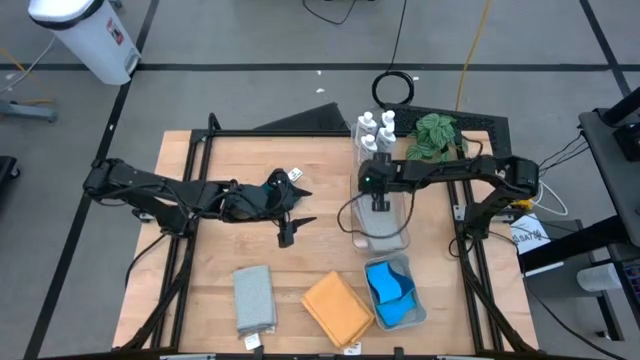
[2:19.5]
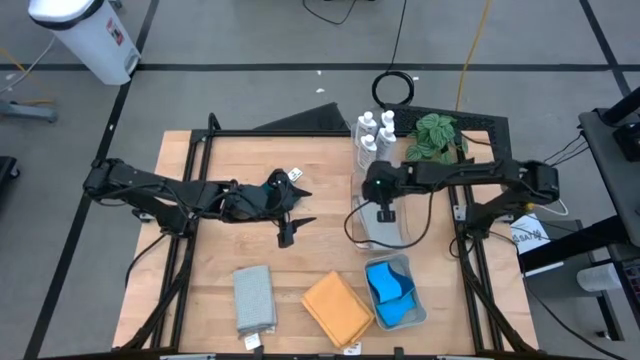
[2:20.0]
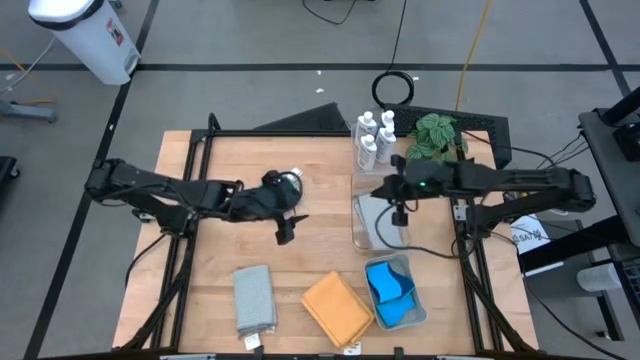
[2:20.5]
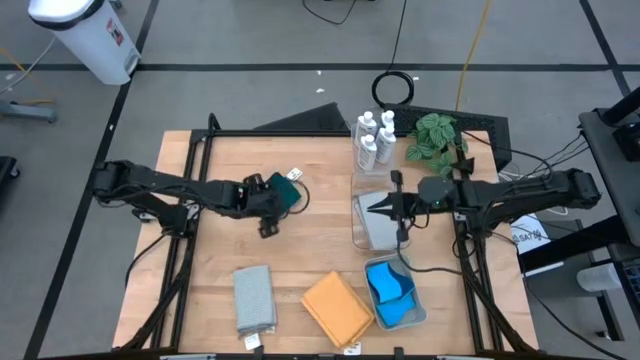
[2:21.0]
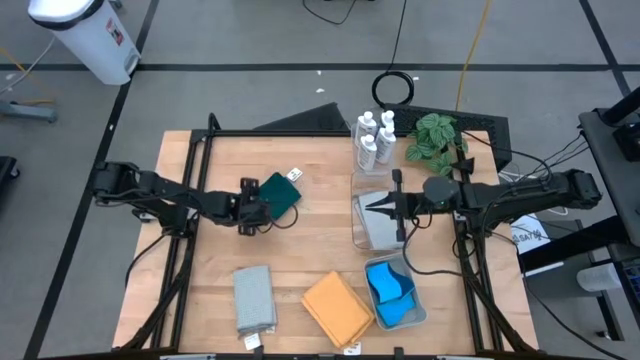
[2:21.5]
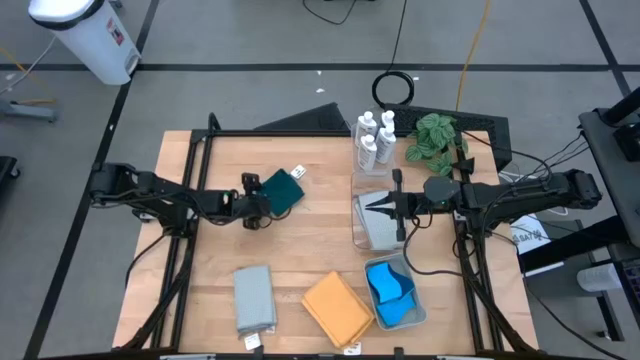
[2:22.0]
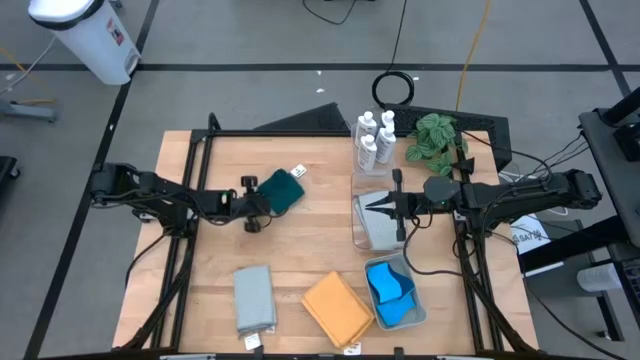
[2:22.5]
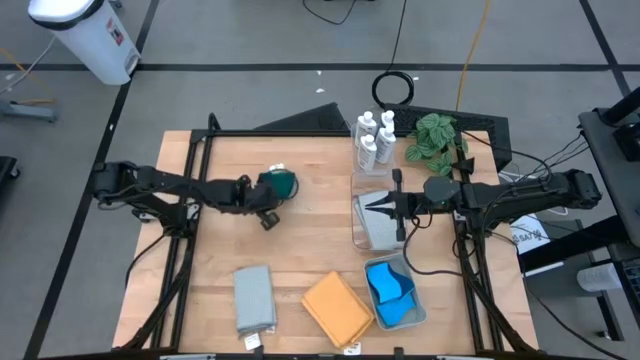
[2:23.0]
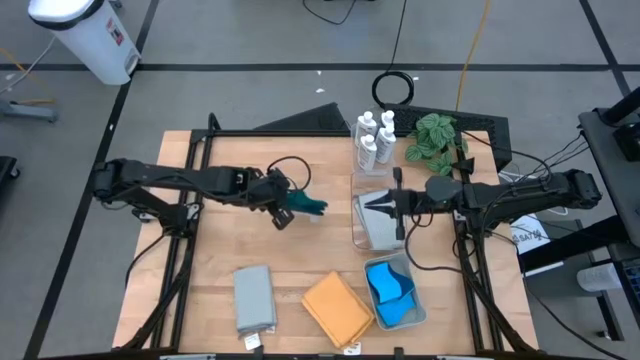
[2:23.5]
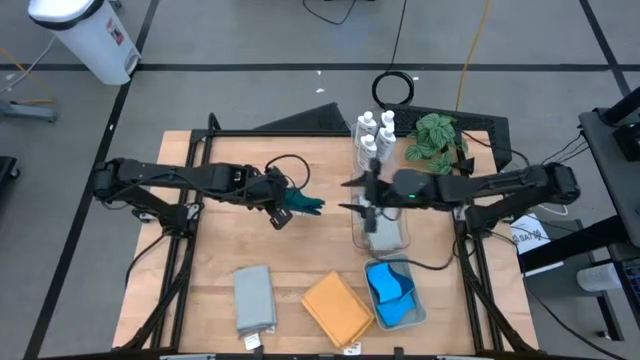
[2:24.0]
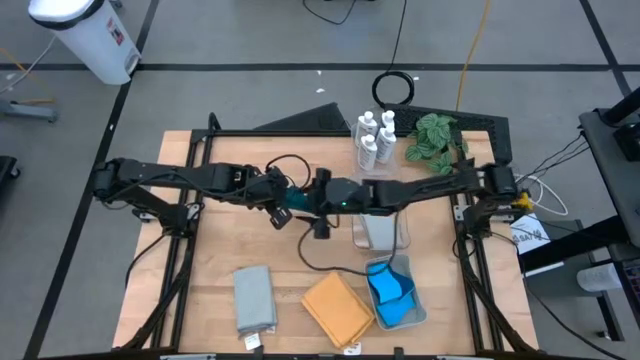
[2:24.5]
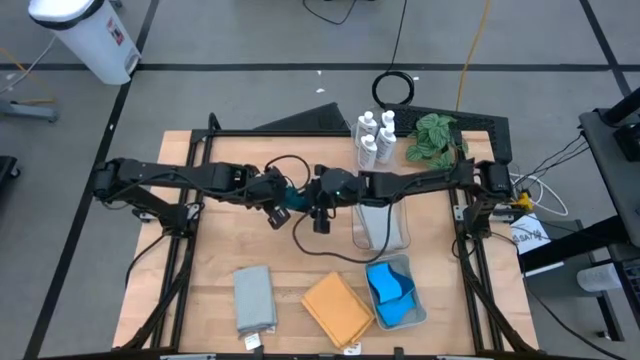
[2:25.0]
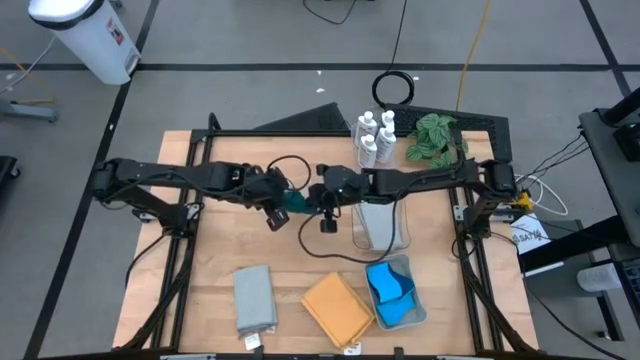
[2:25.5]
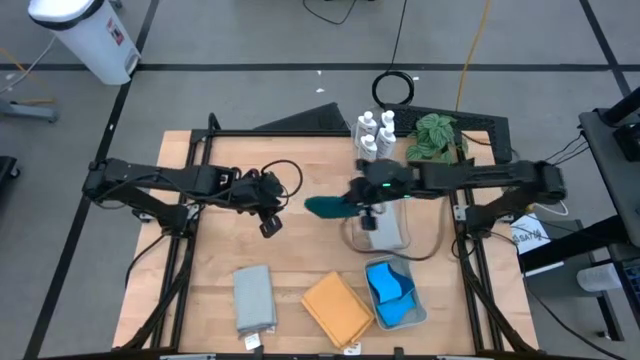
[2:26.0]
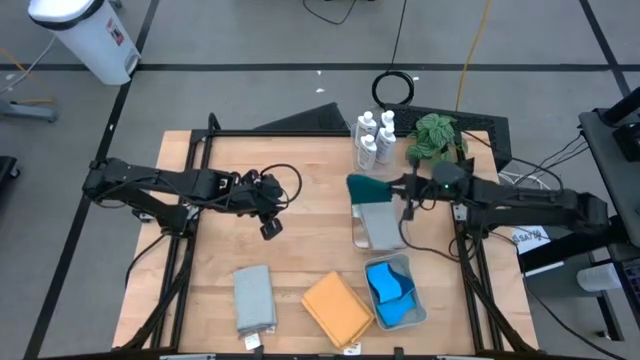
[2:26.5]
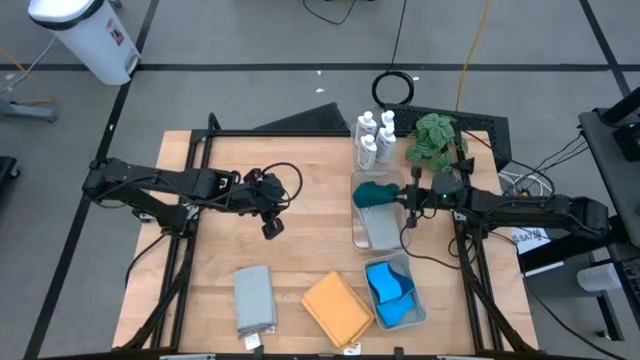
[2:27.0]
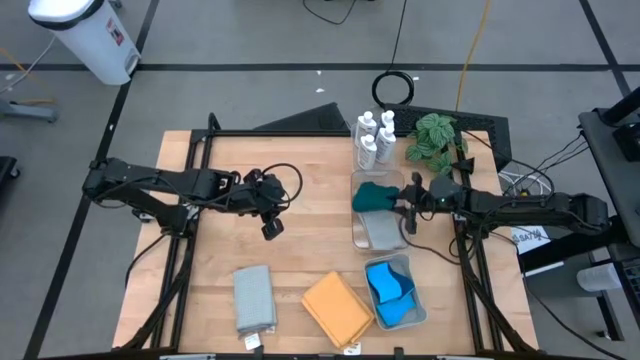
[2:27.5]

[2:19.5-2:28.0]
Task: Pick & Place Kitchen Items
Put the blue towel into the bottom transparent bin

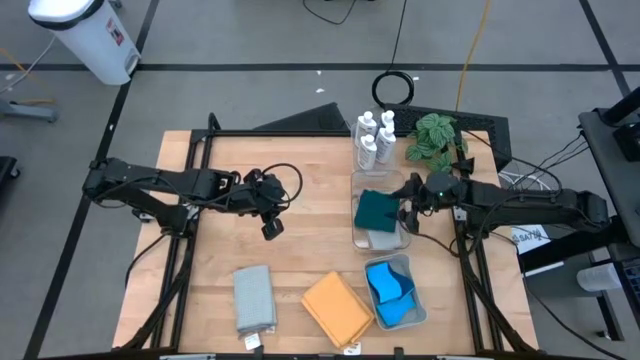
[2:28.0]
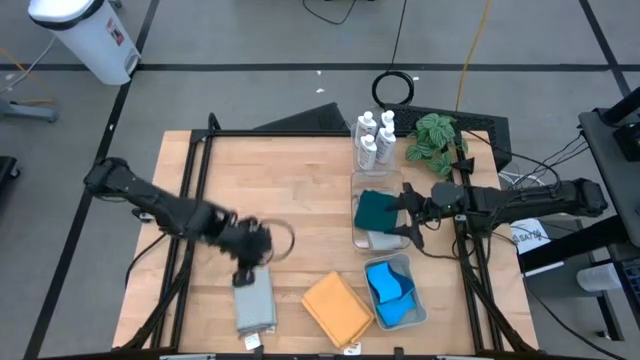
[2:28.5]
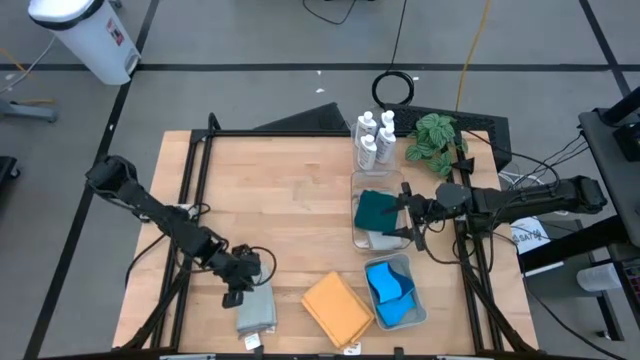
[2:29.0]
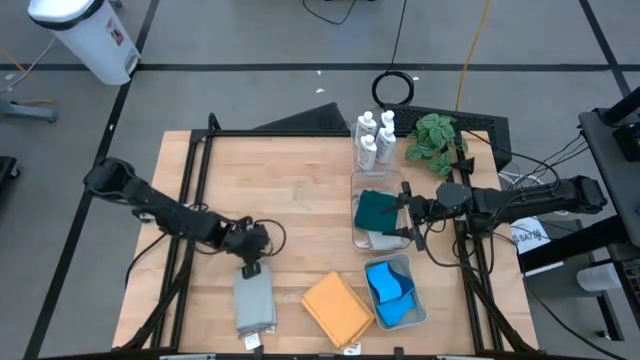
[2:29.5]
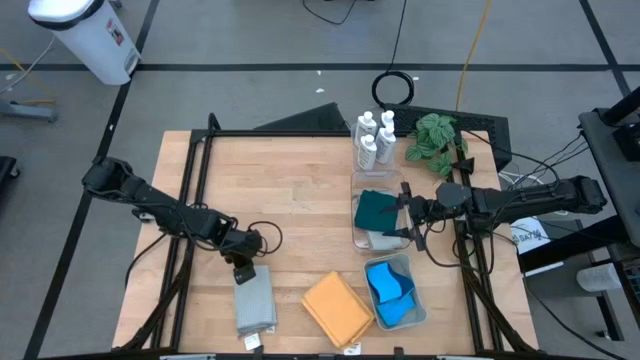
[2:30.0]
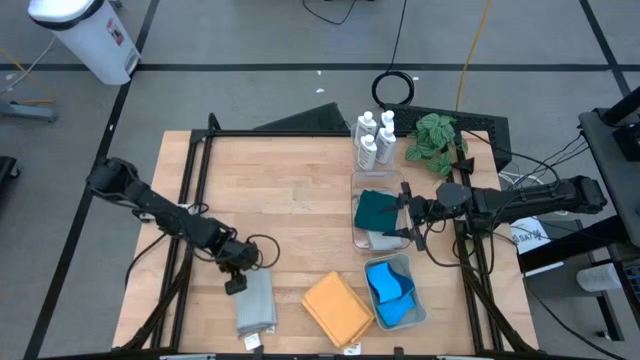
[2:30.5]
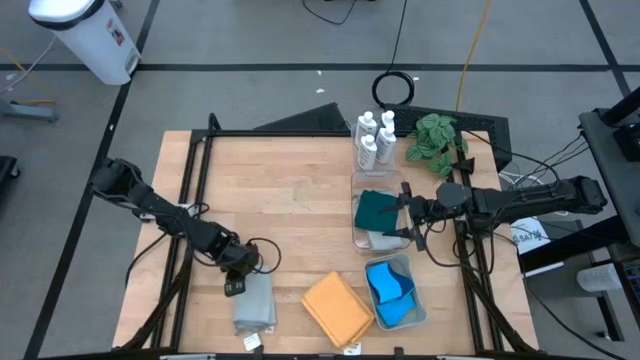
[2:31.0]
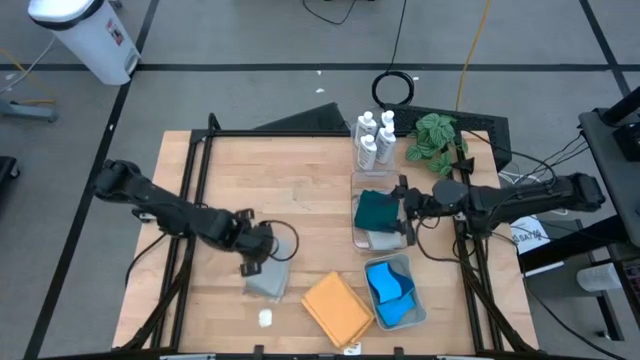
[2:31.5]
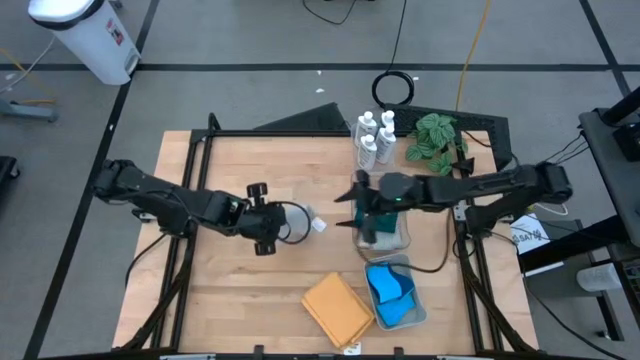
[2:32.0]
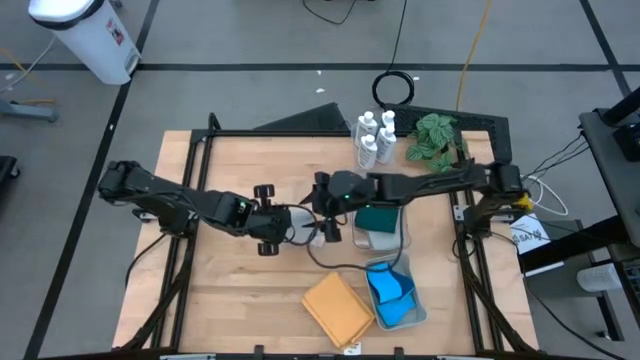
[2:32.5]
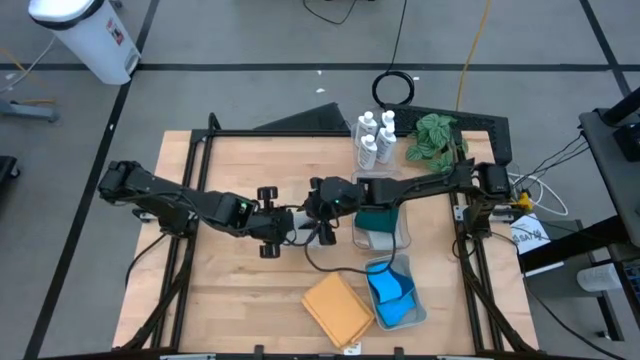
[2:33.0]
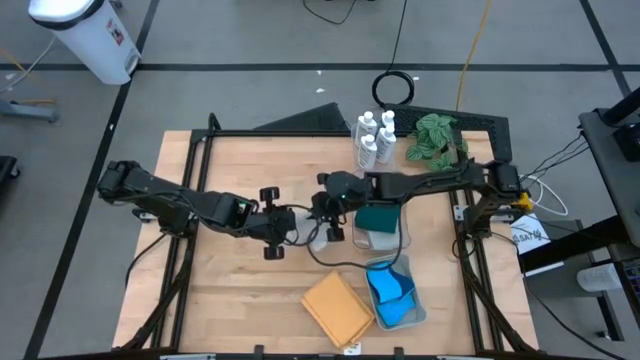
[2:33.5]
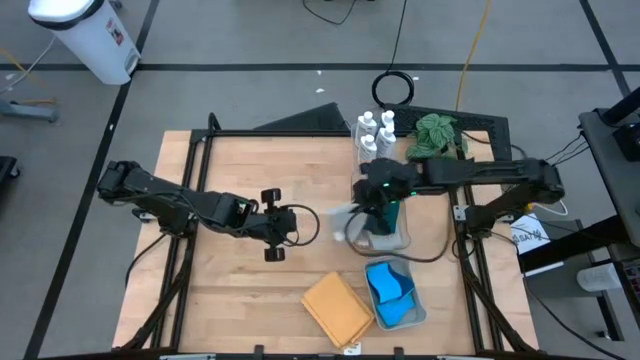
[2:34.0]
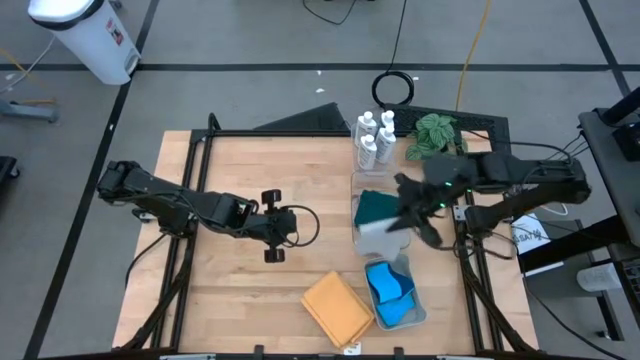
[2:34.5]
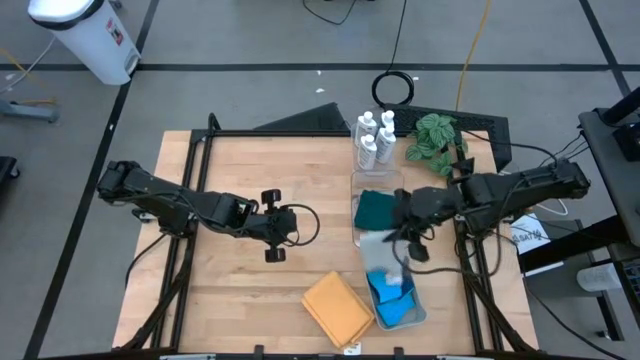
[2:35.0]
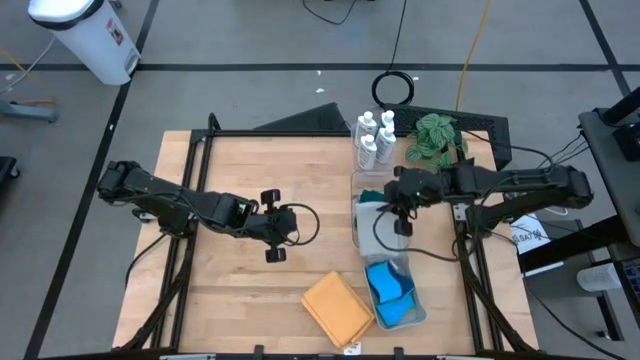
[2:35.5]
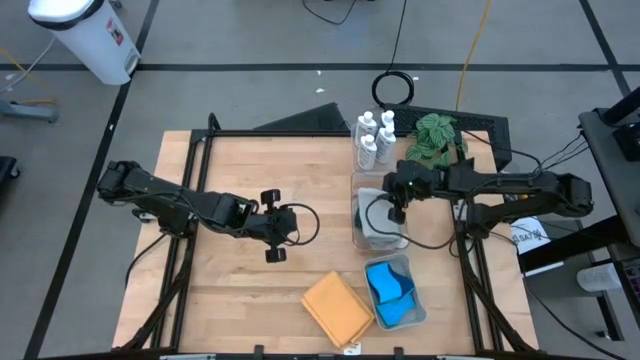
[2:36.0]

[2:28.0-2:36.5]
Put the gray towel into the bottom transparent bin

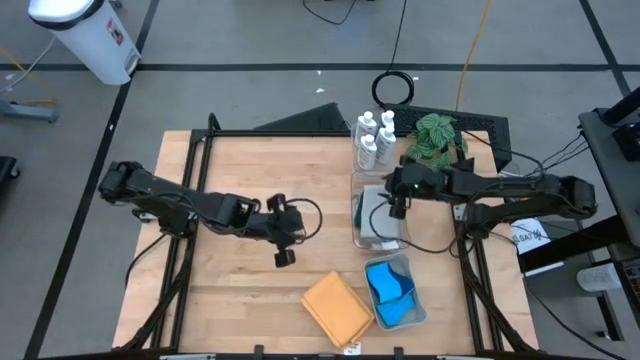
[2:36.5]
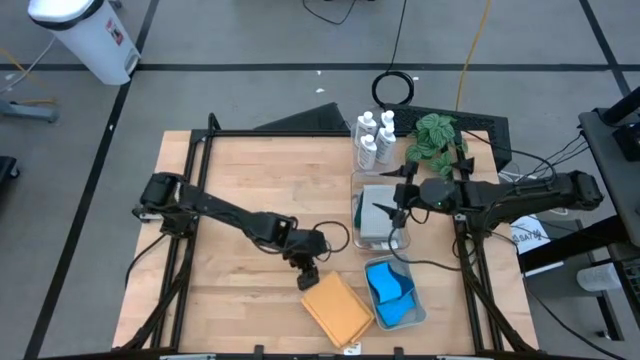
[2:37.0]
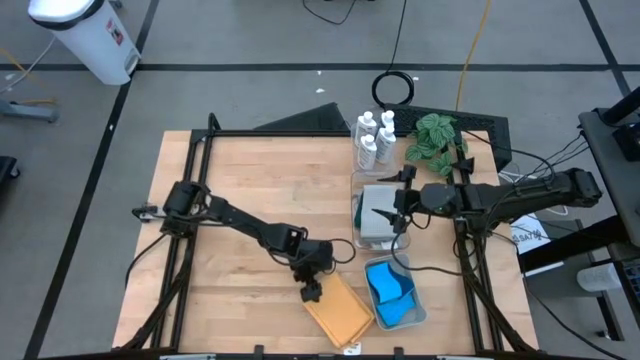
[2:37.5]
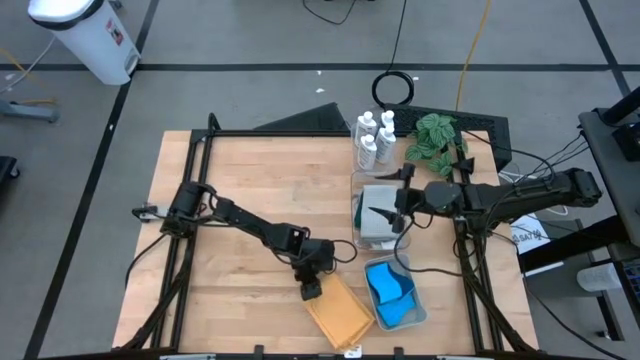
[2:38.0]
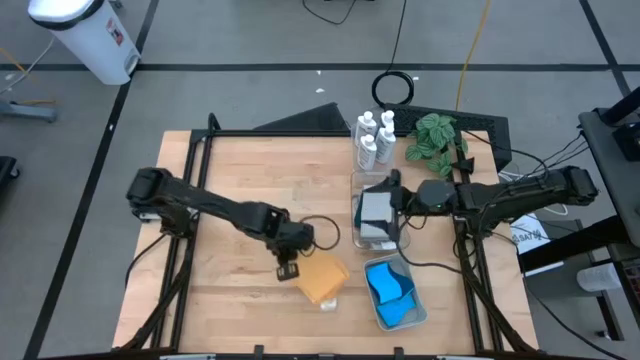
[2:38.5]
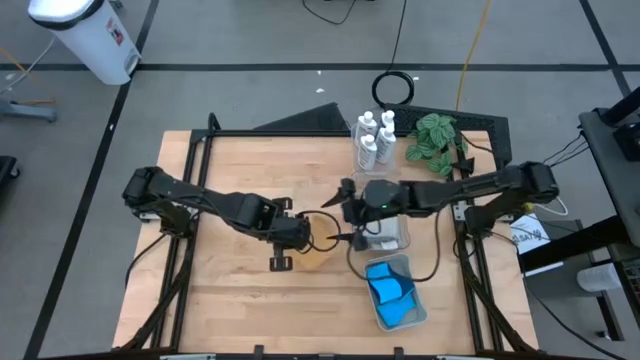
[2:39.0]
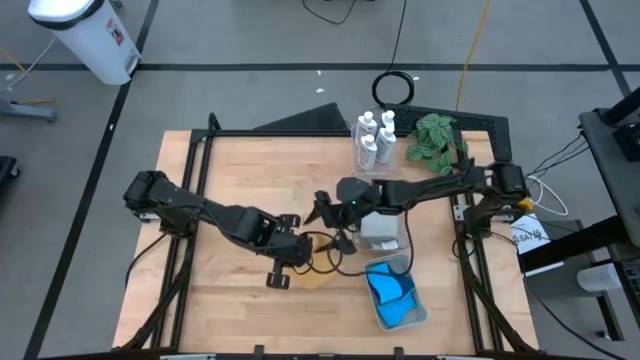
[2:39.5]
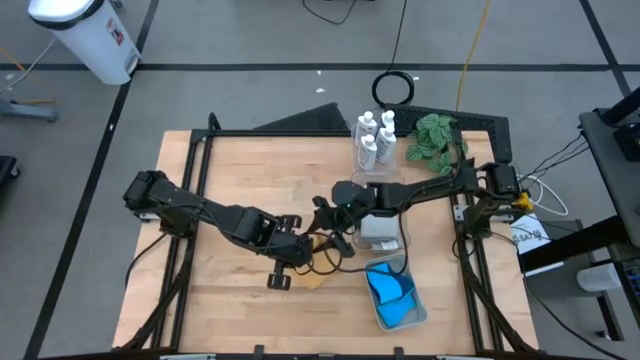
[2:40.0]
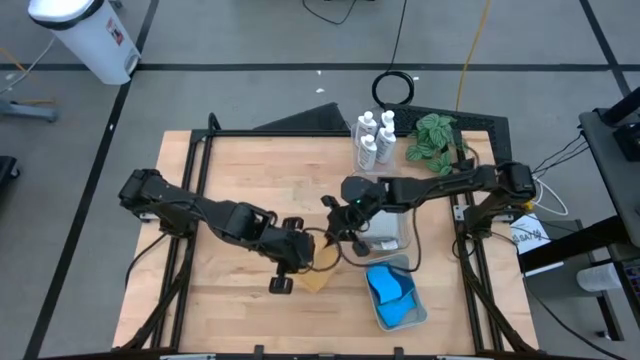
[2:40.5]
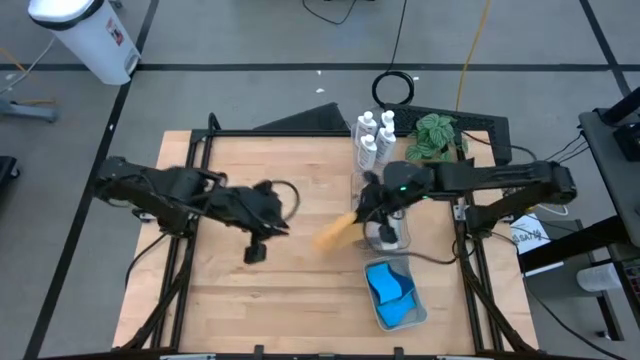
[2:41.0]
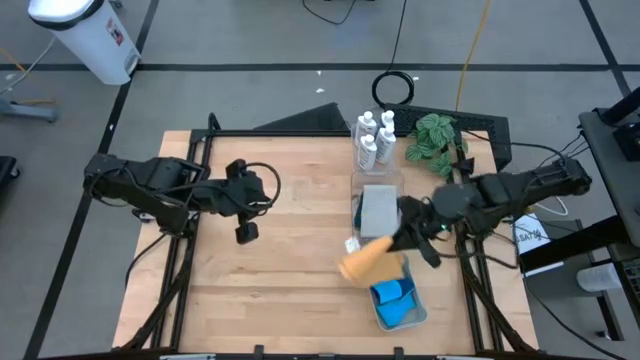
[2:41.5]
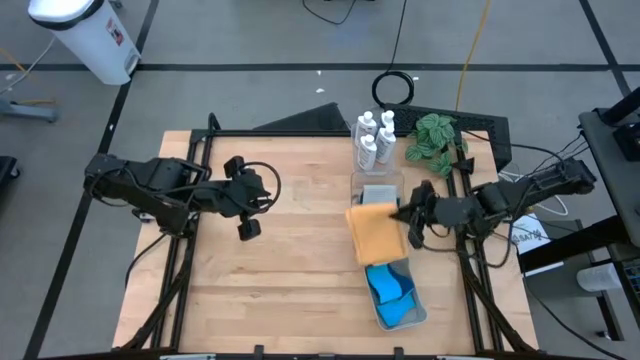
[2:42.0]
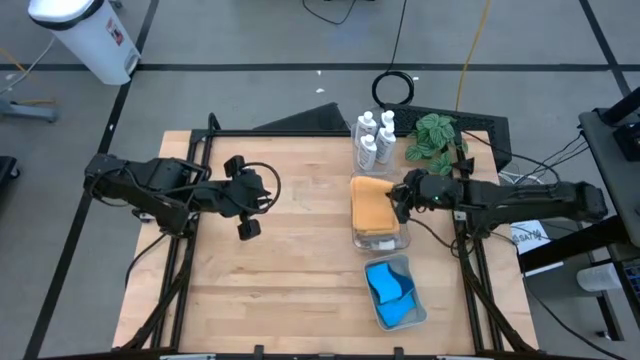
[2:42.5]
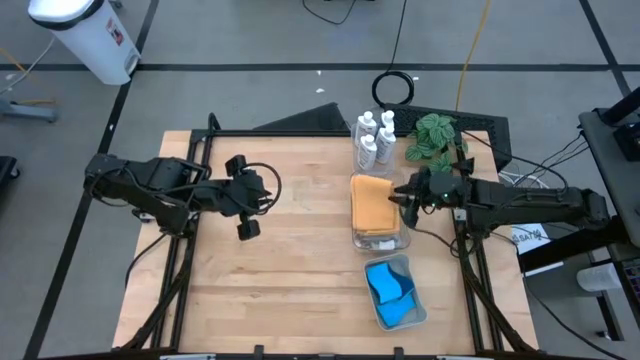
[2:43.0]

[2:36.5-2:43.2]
Put the orange towel into the bottom transparent bin
